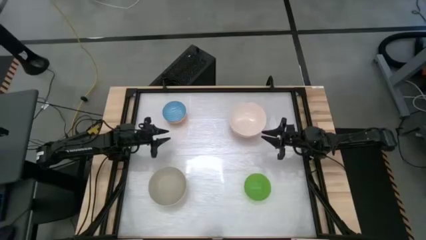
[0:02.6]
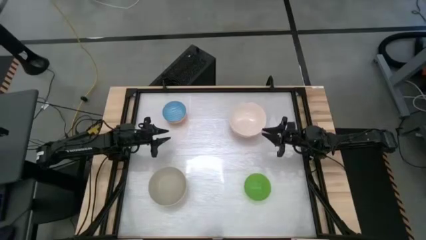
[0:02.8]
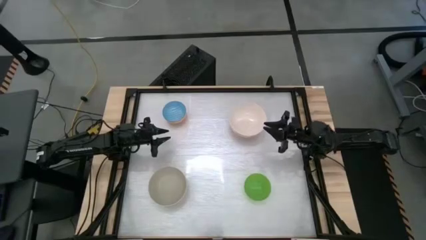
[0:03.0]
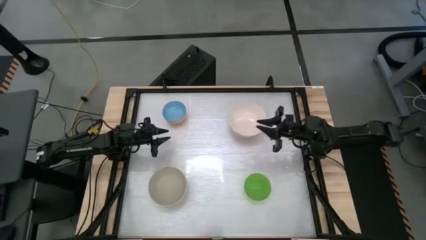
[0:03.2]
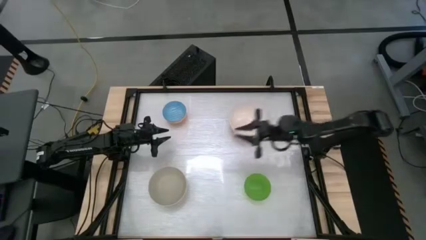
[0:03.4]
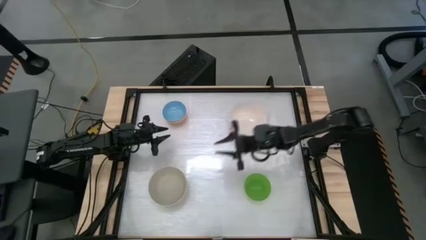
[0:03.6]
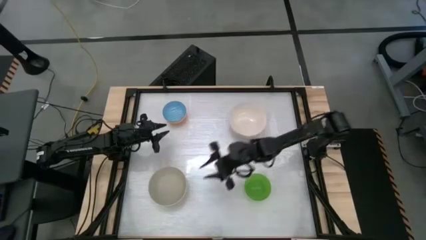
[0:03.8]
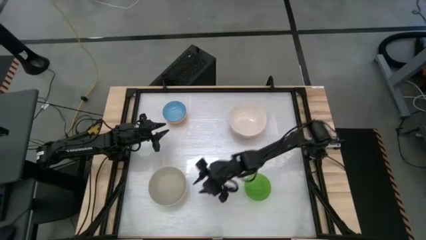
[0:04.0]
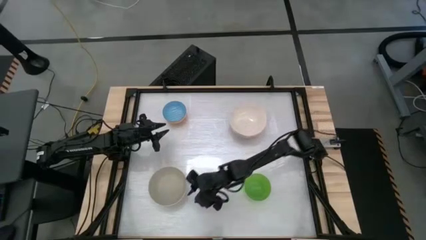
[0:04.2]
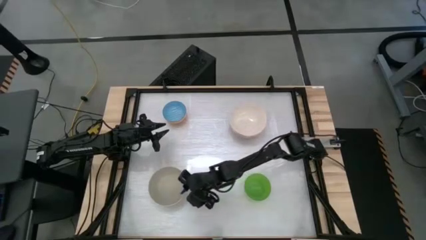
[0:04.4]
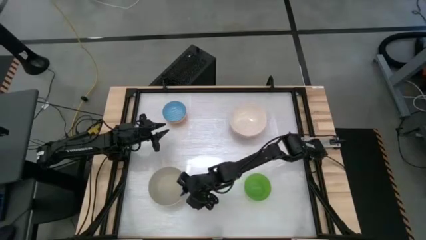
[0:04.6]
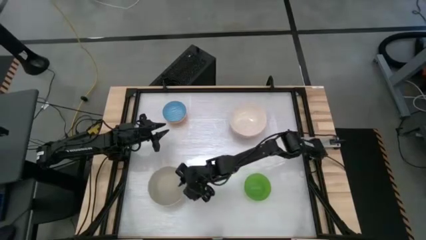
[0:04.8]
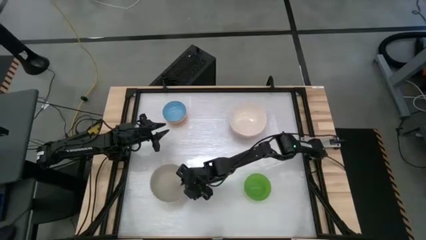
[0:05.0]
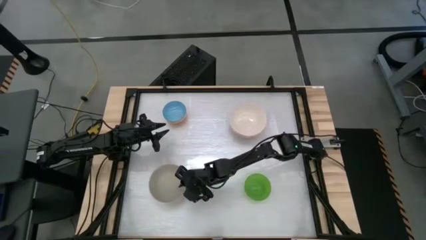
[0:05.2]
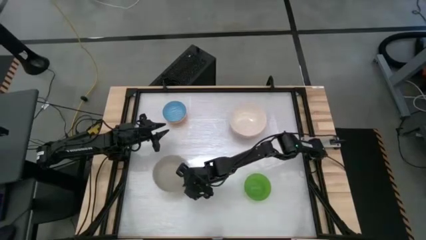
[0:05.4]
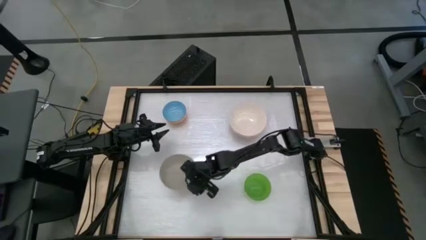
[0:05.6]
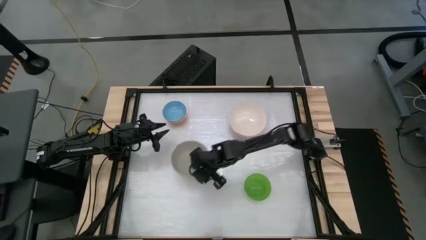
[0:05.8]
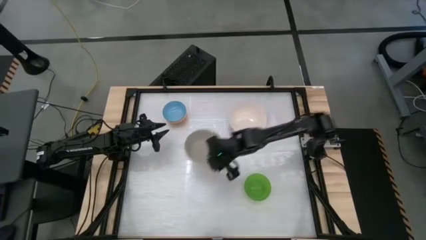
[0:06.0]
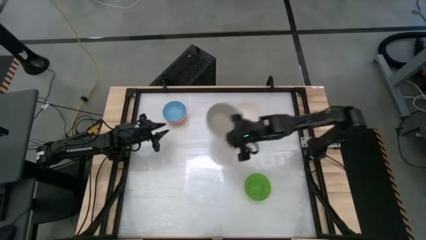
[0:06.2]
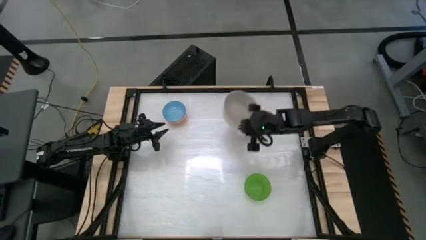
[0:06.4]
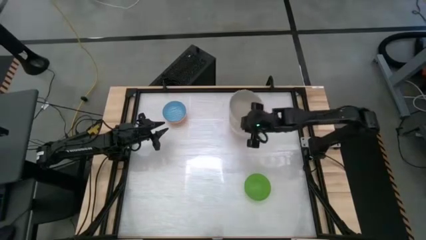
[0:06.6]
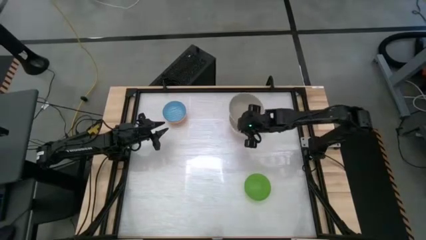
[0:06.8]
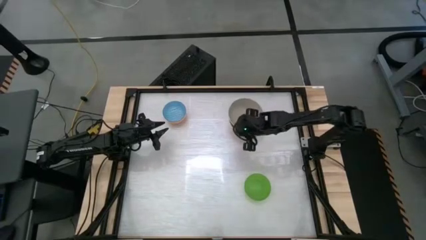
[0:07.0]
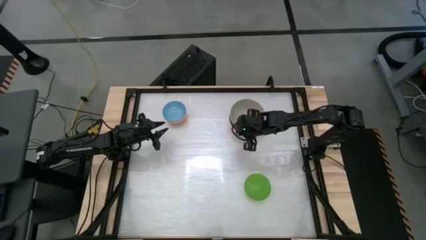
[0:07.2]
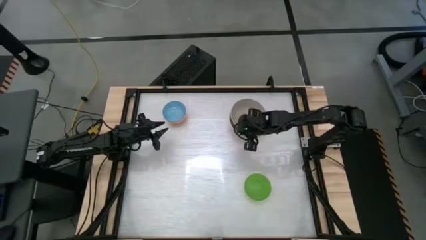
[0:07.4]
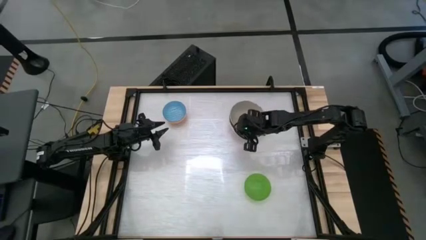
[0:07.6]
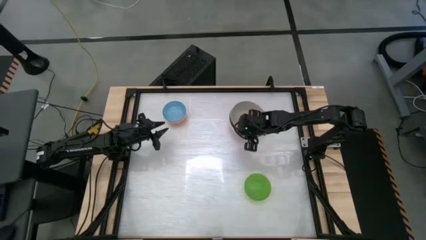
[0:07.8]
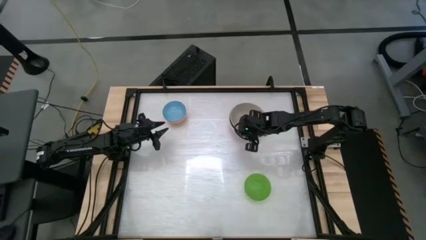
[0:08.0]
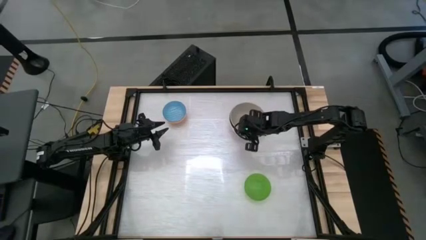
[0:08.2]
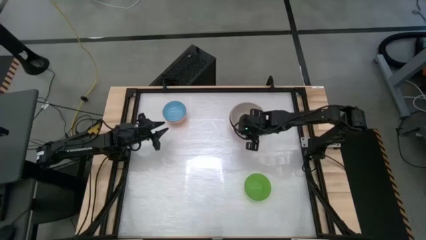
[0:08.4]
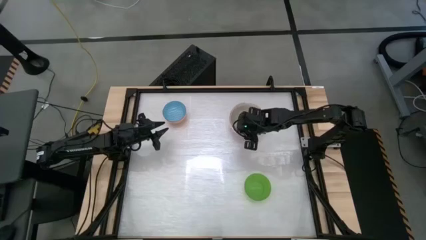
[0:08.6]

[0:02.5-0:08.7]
Stack the gray bowl on top of the pink bowl

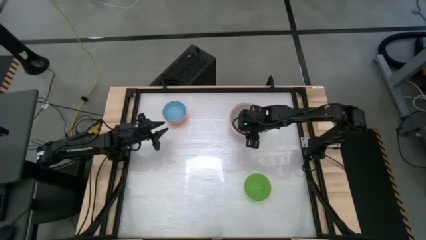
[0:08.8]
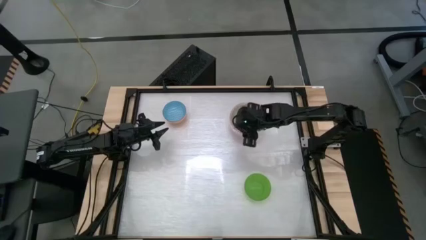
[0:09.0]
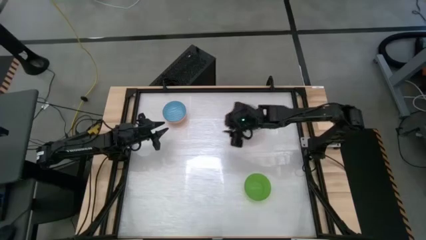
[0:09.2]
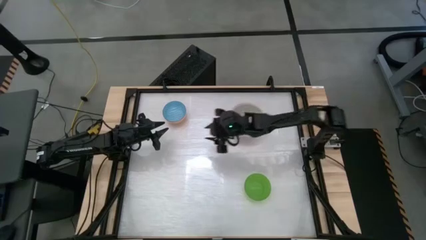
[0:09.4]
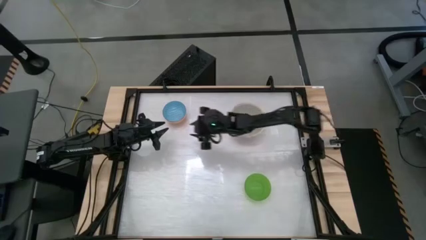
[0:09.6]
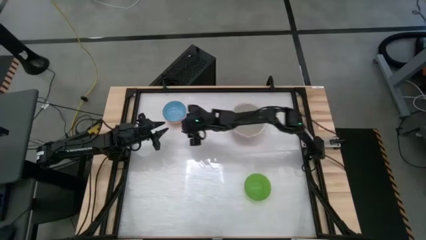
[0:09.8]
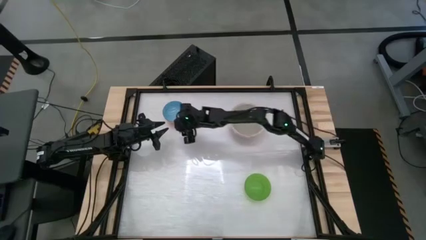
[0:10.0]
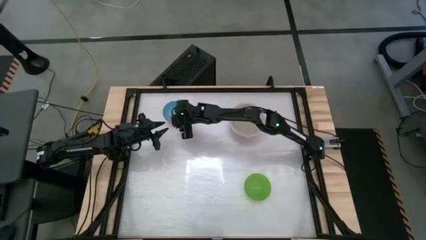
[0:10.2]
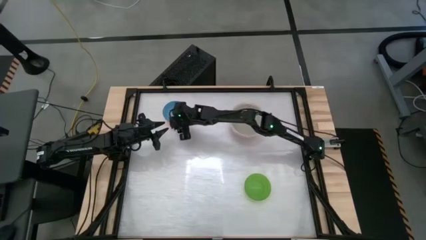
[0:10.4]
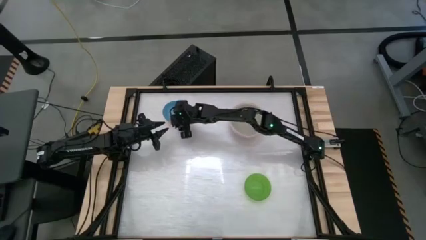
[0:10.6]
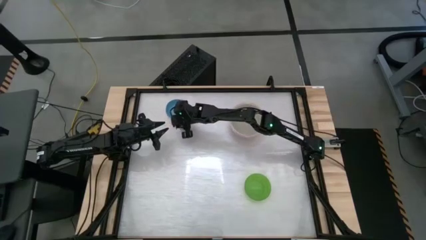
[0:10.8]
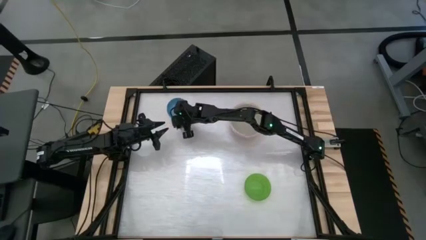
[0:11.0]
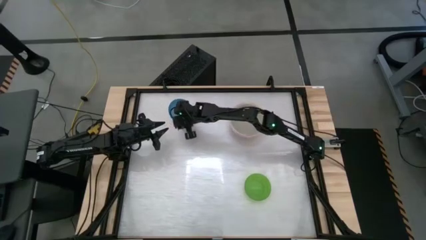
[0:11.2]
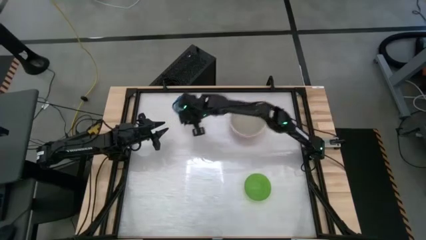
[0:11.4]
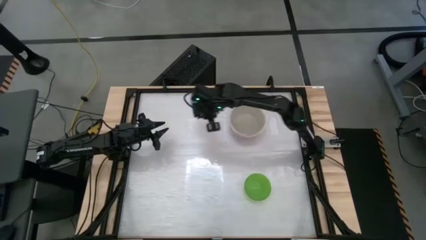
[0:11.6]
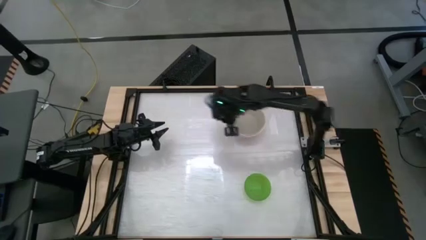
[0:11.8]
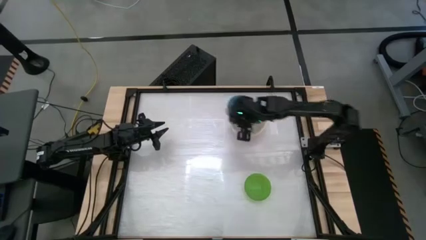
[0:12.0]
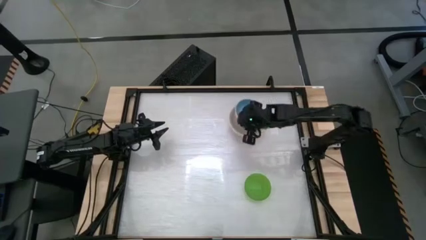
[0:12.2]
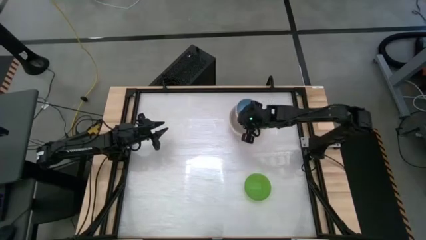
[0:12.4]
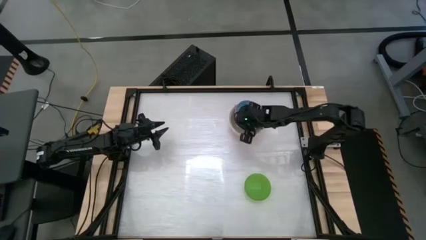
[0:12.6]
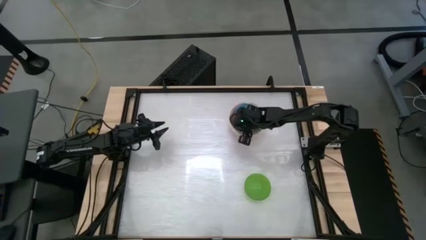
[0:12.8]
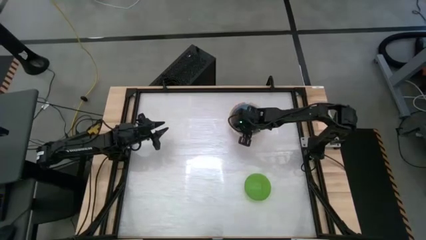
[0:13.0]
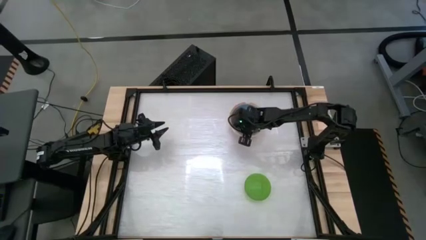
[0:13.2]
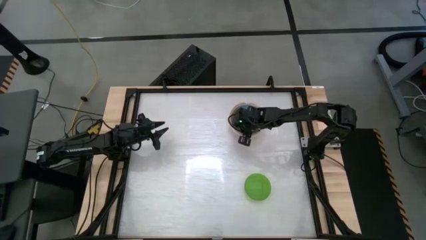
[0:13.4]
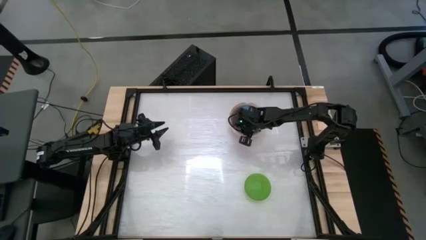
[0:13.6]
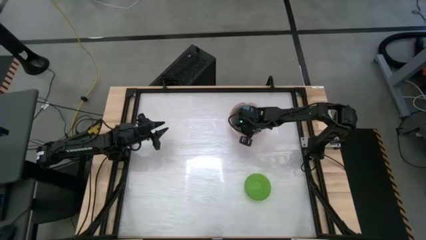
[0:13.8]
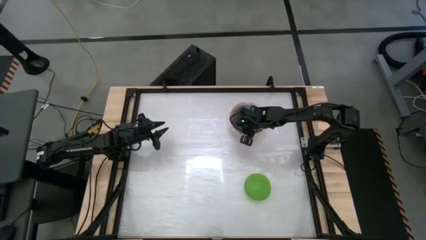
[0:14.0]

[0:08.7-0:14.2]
Stack the blue patterned bowl on top of the gray bowl

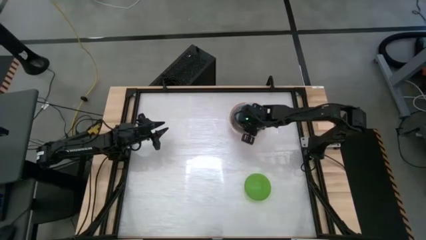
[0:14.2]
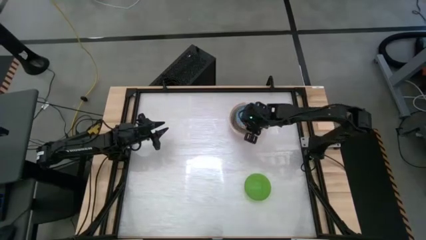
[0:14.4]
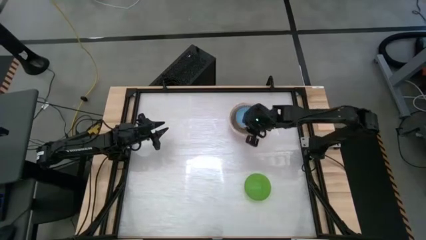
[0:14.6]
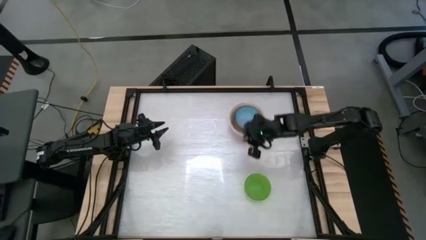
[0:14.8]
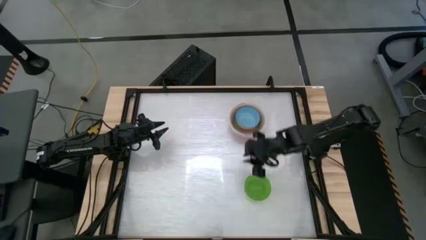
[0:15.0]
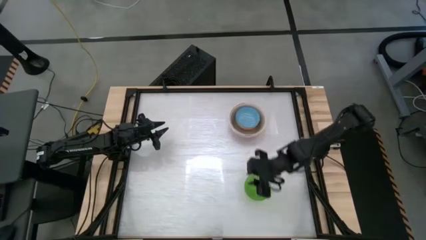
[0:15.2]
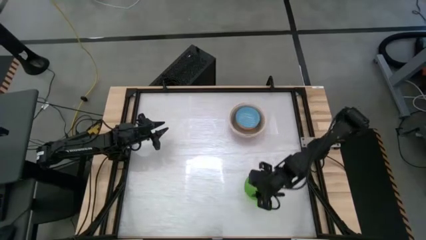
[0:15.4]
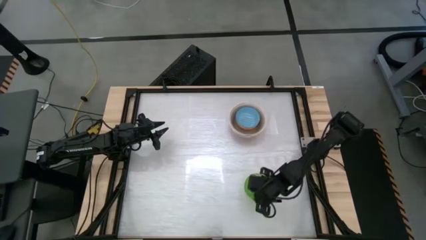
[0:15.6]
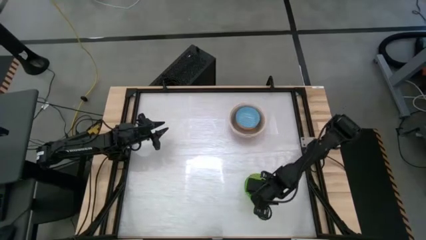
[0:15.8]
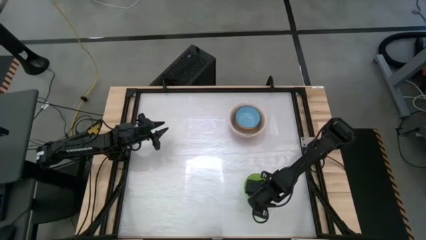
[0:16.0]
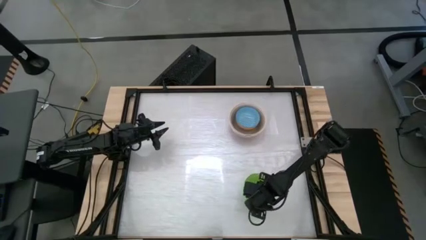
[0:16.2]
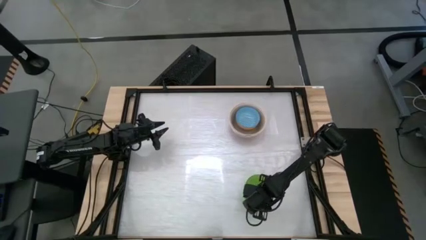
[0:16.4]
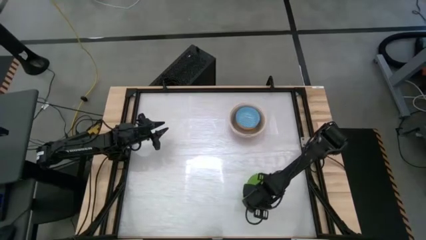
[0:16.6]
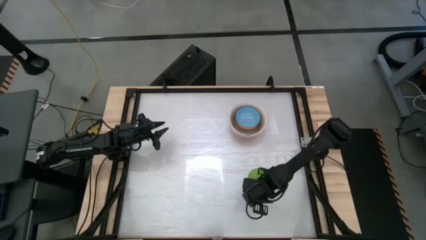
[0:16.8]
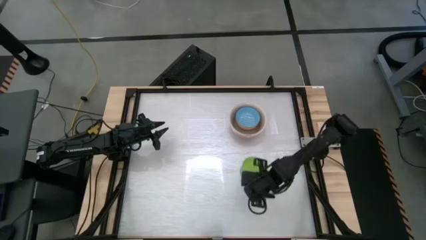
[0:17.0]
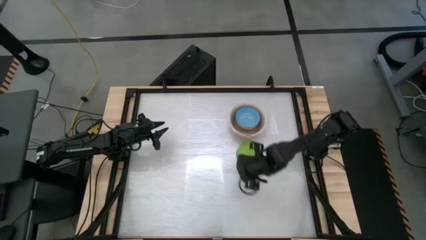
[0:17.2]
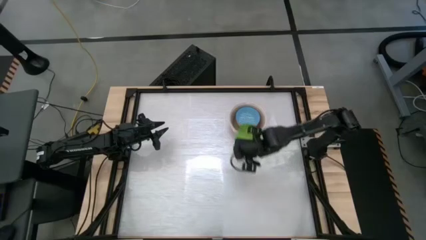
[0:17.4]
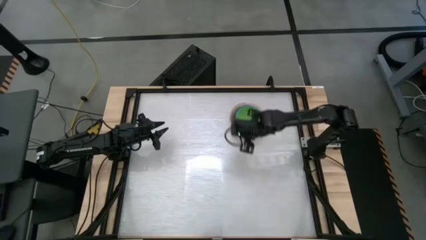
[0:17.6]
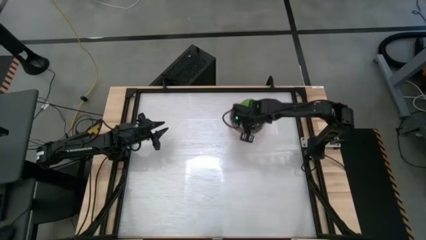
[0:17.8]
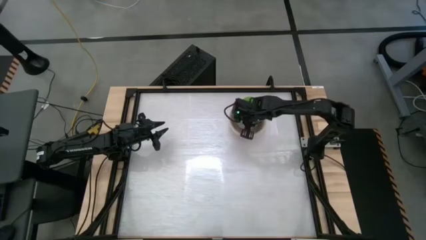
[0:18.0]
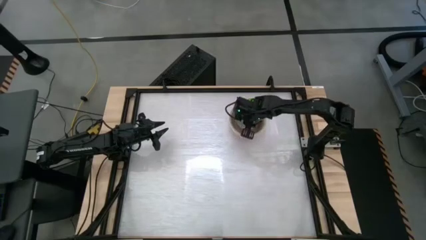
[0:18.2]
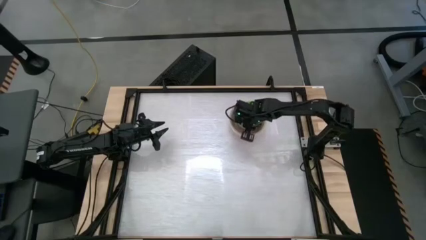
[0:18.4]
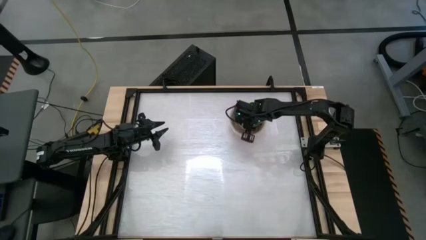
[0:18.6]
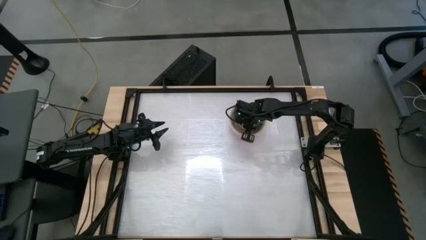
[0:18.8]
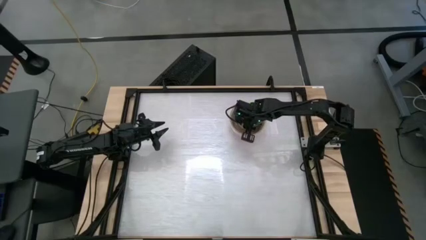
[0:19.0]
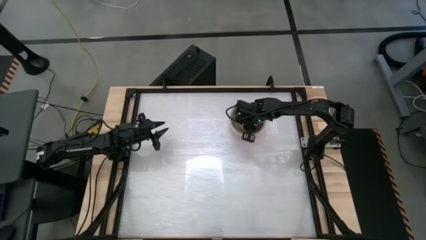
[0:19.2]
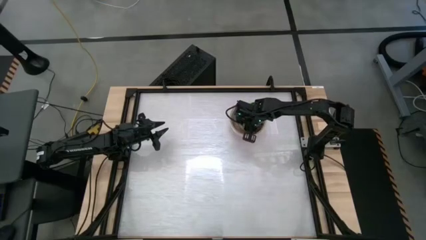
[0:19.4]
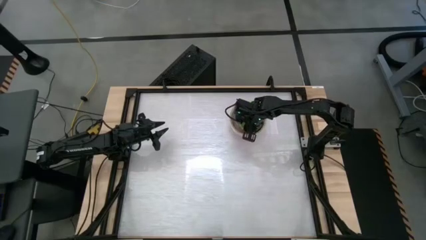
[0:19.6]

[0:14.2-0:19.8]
Stack the green bowl on top of the blue patterned bowl
